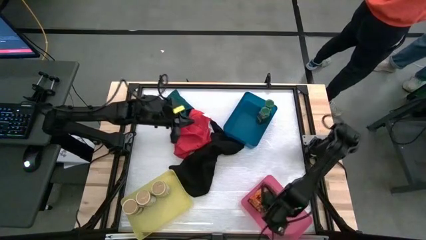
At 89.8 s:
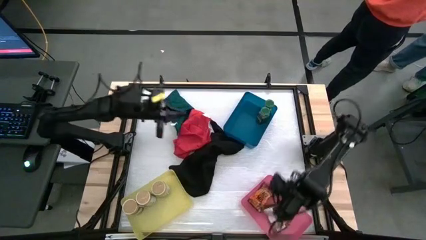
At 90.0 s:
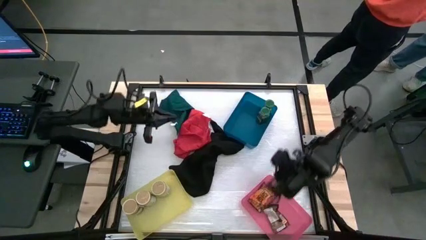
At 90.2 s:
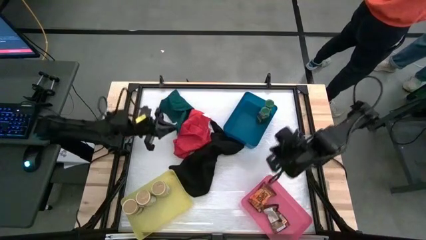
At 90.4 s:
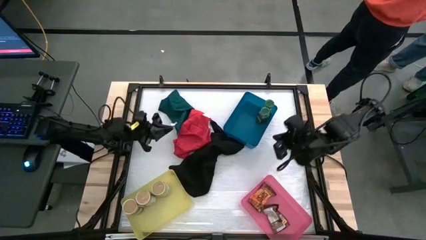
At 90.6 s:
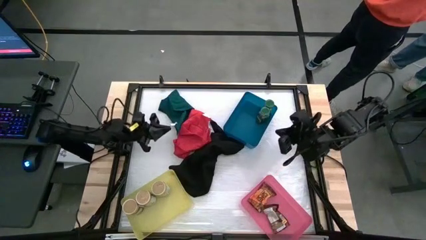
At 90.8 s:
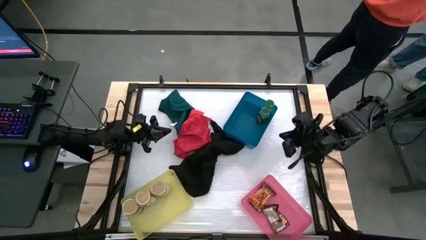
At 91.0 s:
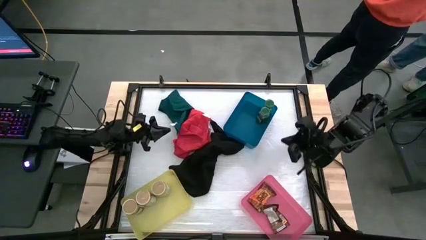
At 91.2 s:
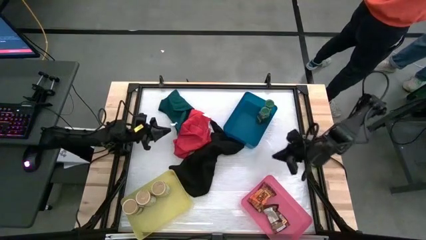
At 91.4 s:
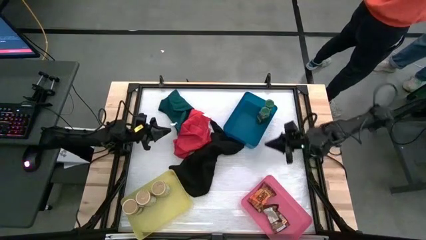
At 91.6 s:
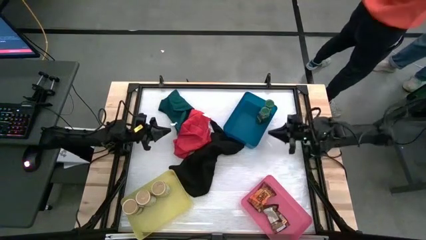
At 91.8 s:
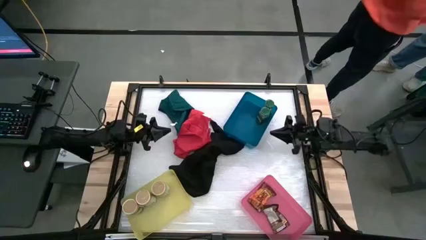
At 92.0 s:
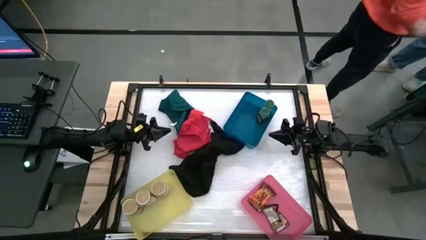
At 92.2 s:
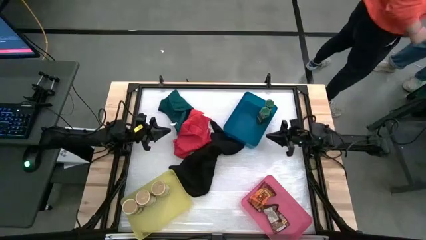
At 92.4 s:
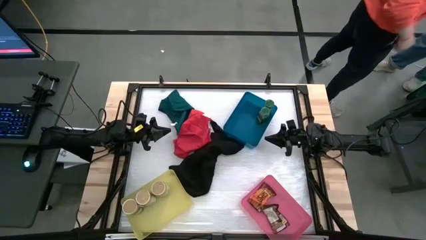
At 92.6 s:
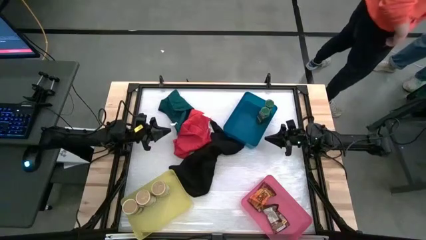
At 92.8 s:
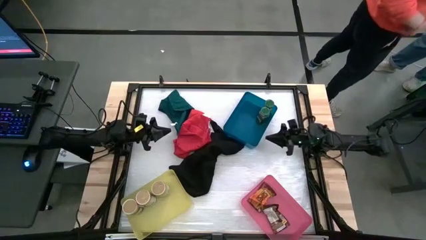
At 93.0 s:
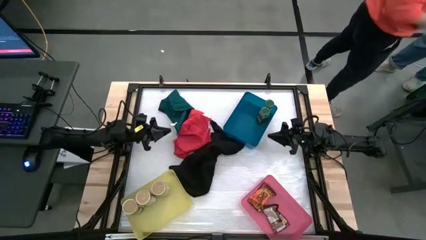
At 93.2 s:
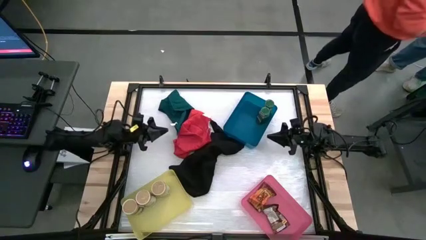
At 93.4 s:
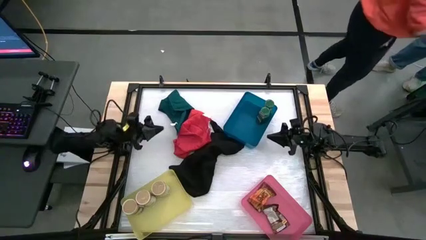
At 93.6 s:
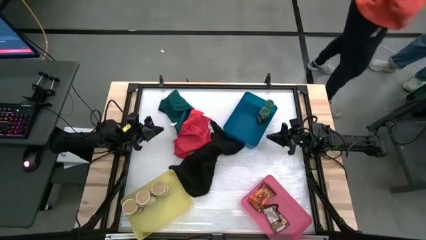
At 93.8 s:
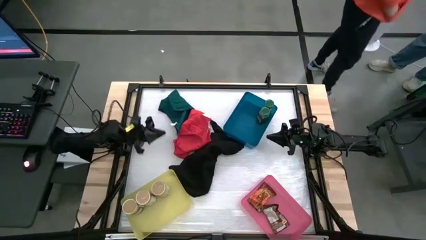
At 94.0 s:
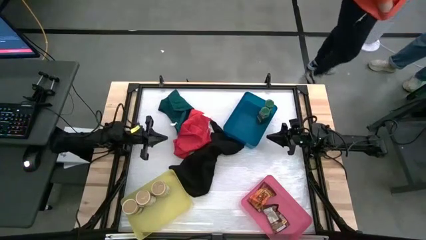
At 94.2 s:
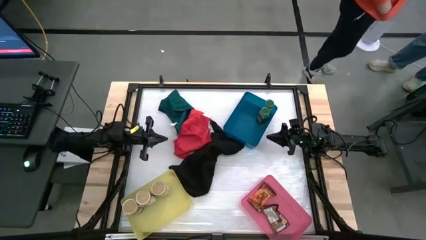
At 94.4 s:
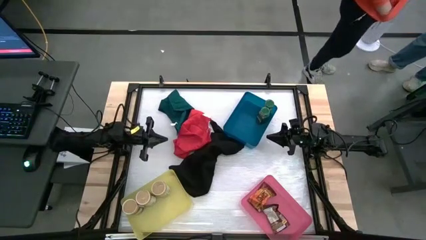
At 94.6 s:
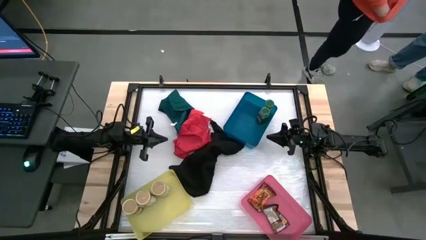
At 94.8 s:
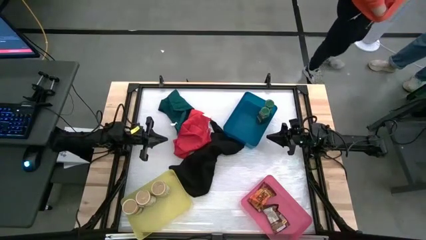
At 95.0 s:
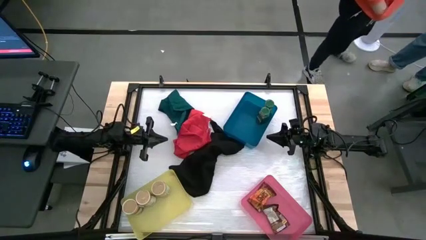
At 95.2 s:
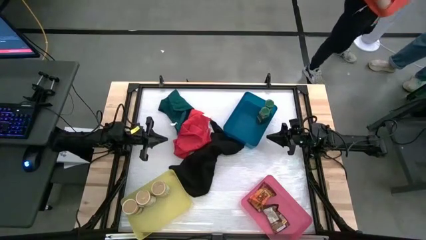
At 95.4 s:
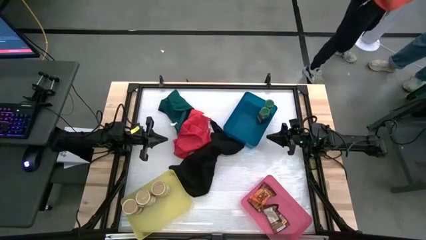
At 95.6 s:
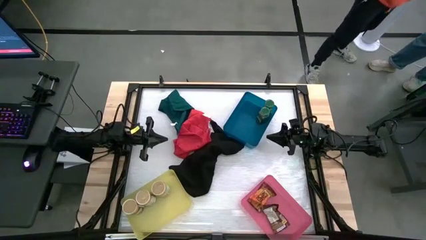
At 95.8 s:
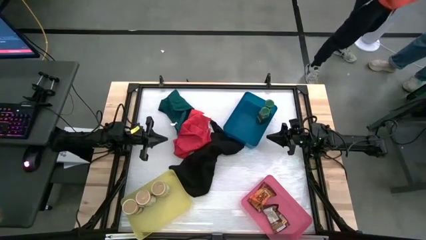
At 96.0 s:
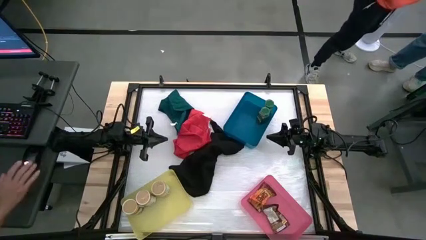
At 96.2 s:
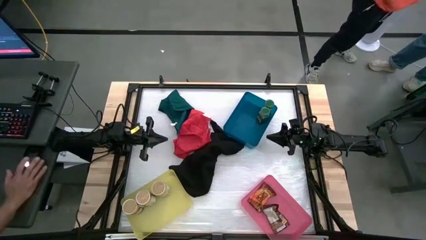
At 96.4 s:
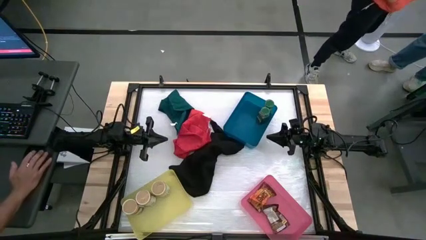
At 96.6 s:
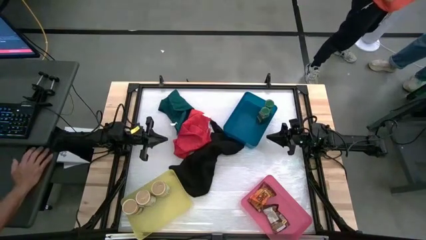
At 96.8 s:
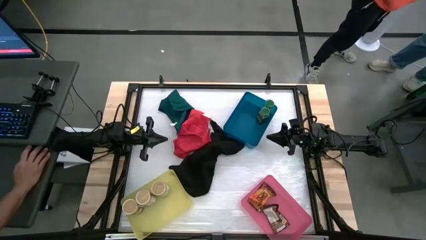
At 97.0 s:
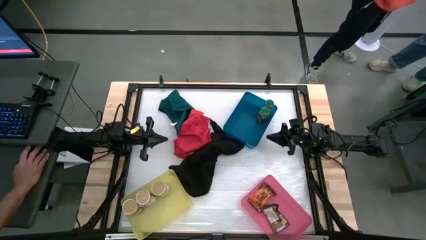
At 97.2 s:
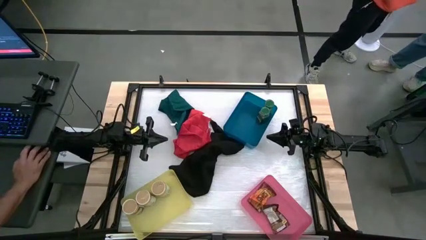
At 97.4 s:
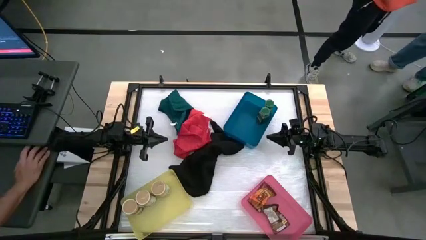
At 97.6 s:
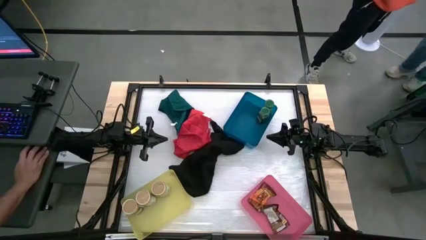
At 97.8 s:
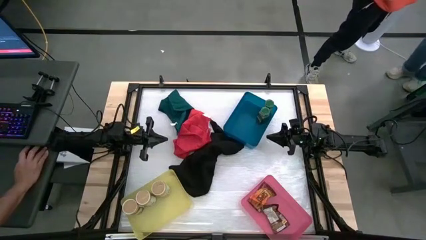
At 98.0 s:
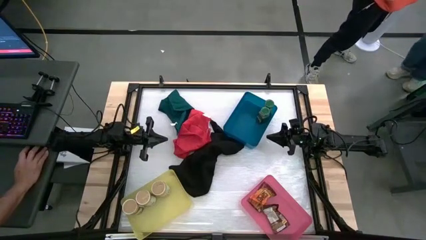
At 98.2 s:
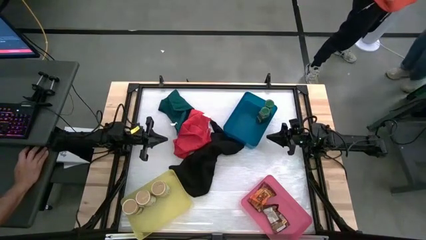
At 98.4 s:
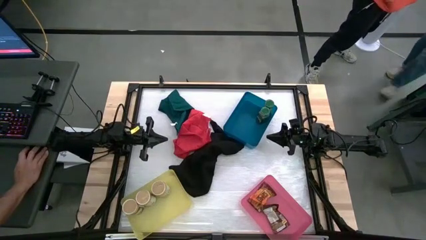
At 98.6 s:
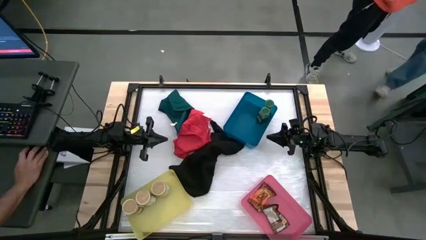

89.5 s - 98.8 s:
Task: Sort spices by type
Return to Home Position

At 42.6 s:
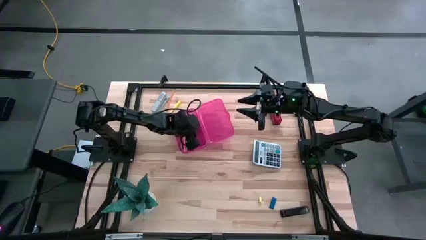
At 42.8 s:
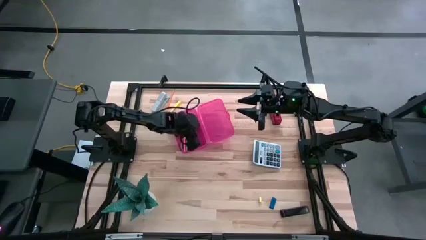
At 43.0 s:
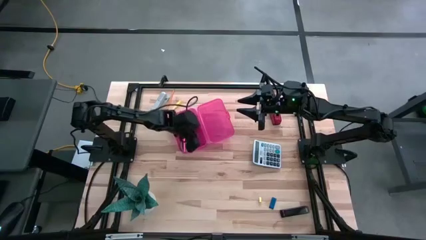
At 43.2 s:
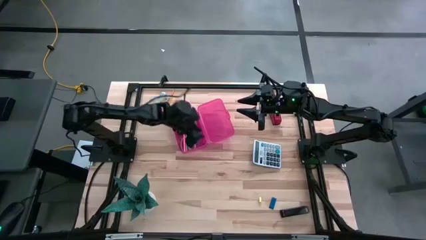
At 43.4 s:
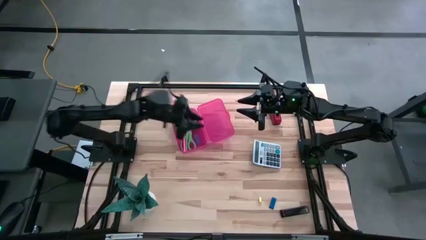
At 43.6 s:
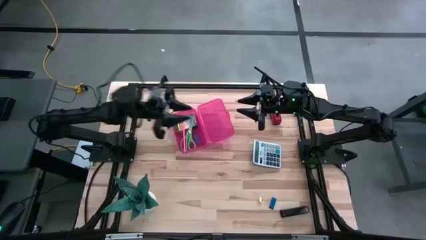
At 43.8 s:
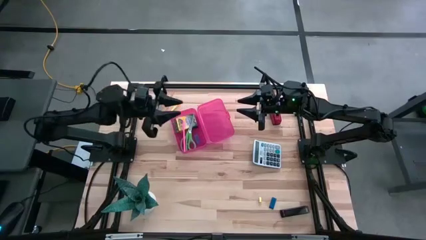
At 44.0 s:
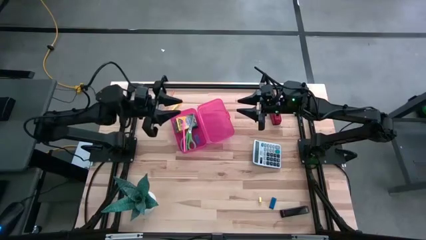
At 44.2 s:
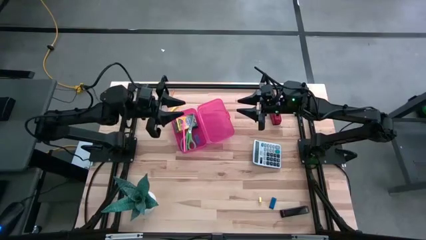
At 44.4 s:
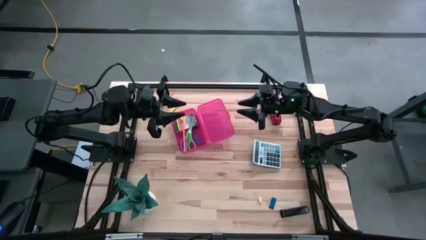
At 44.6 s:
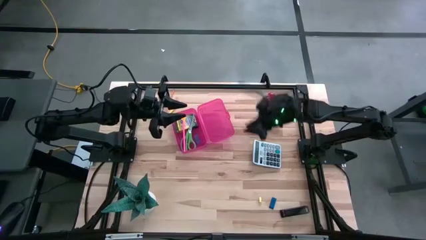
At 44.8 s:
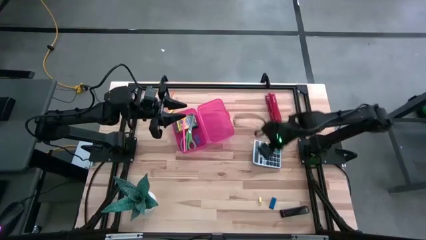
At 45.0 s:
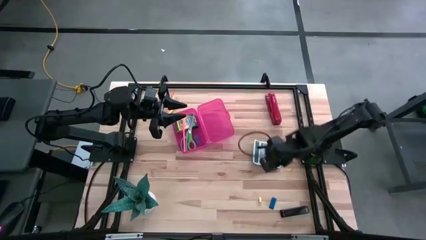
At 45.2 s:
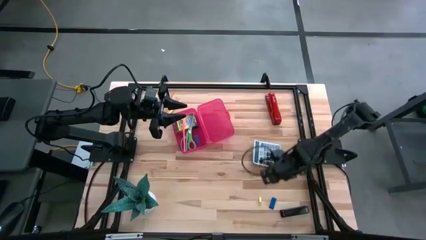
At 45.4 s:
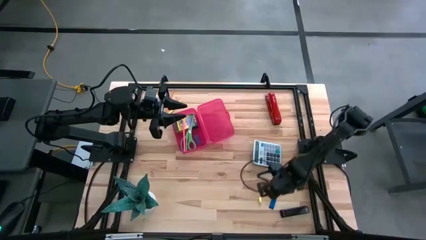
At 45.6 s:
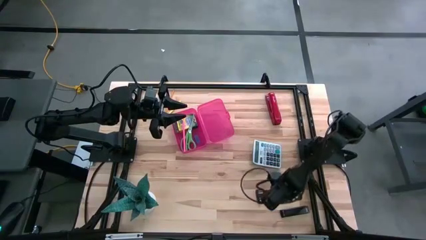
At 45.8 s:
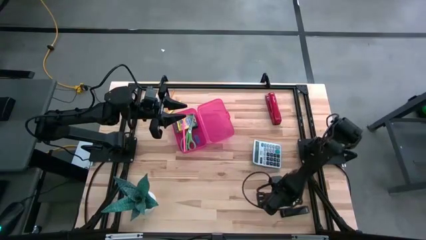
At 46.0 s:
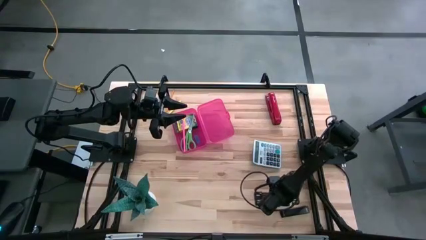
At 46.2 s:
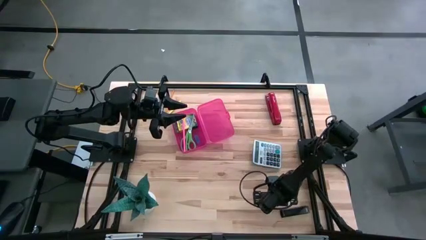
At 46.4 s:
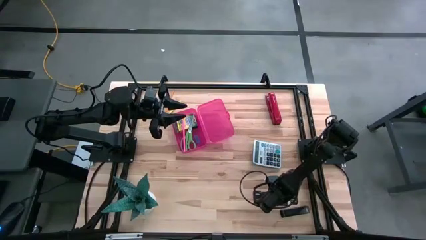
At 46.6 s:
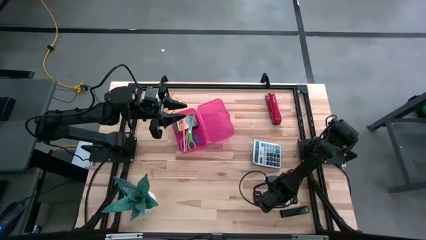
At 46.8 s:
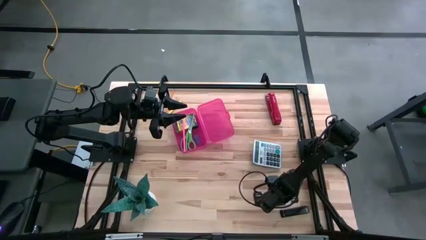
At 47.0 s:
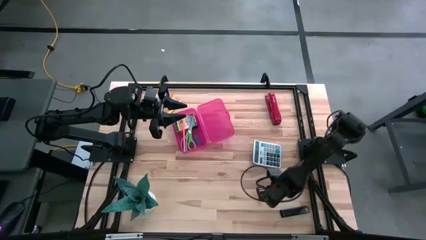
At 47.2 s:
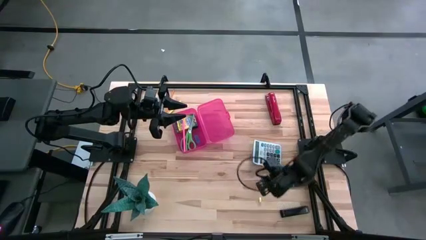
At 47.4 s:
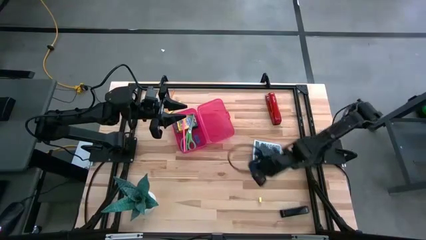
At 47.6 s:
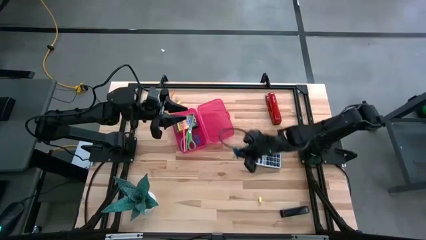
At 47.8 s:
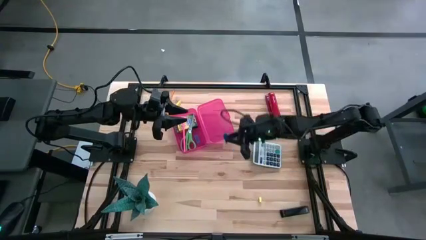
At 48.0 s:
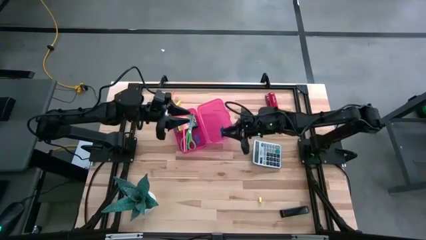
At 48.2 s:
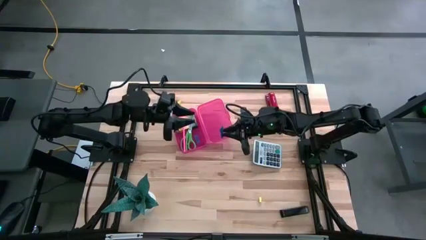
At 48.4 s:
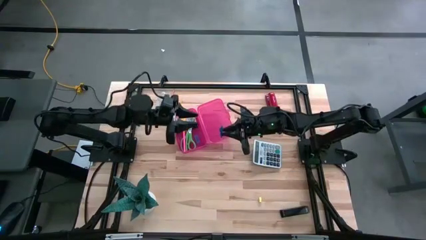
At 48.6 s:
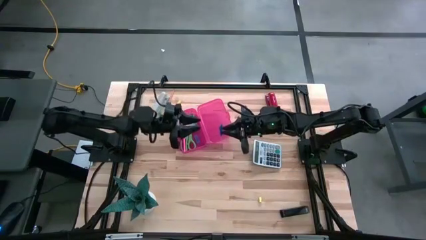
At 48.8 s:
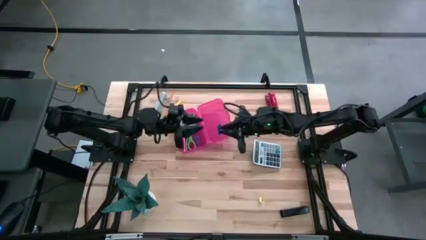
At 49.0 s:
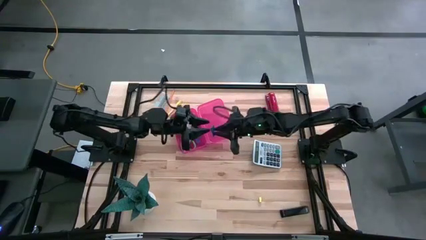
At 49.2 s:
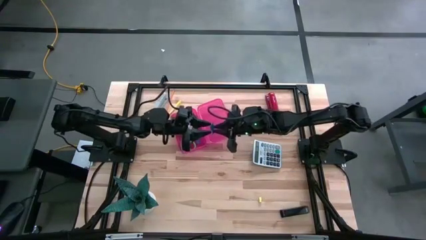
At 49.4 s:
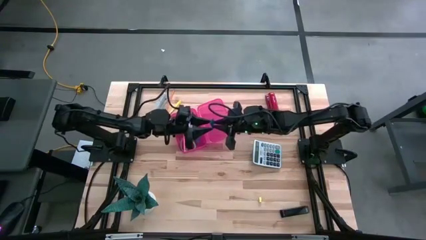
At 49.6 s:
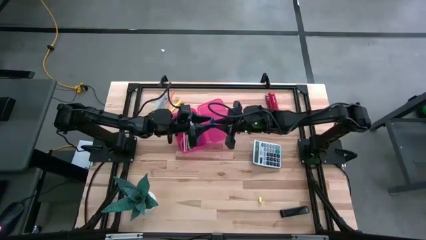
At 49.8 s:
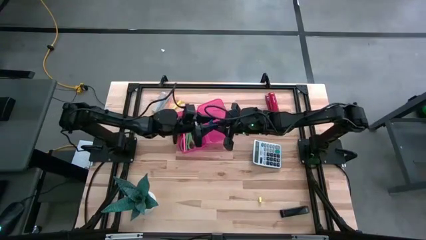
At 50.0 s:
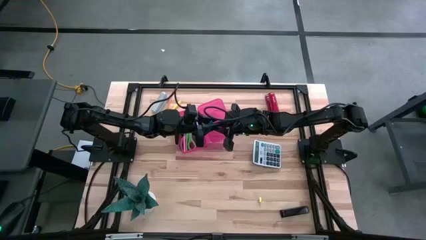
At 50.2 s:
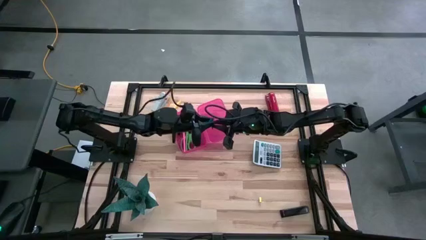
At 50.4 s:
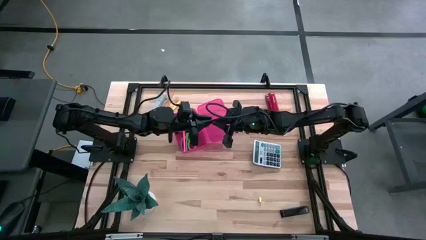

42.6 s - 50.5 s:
Task: Pack school essentials
Put the blue eraser into the pink pencil box
